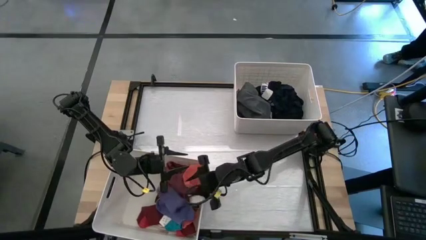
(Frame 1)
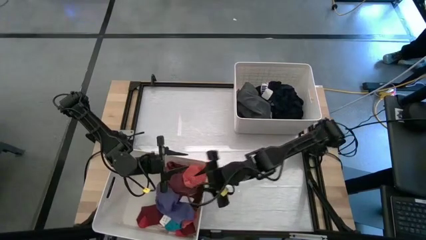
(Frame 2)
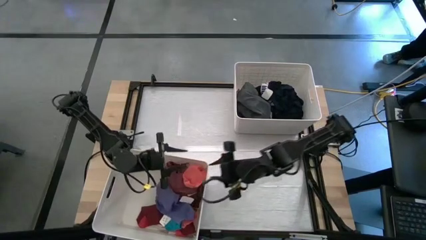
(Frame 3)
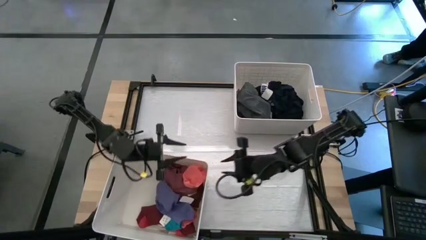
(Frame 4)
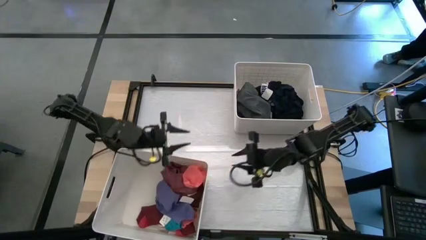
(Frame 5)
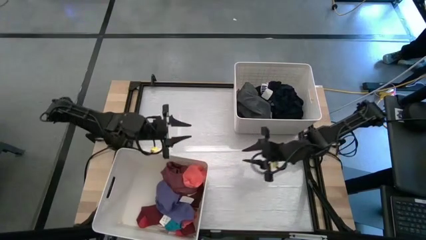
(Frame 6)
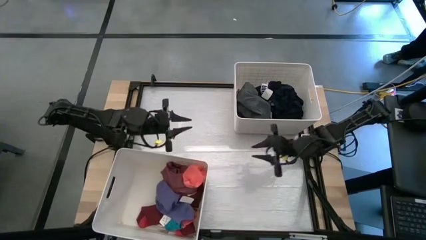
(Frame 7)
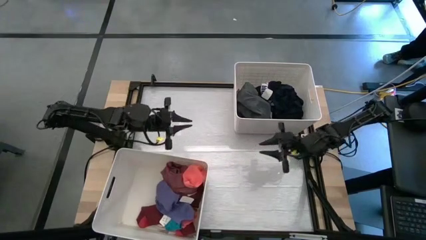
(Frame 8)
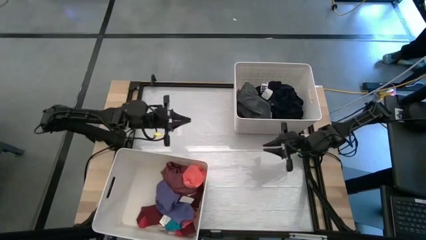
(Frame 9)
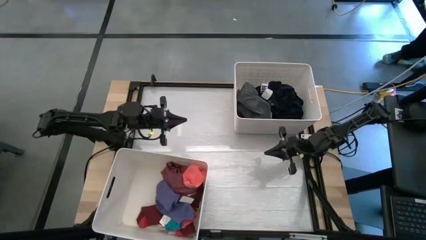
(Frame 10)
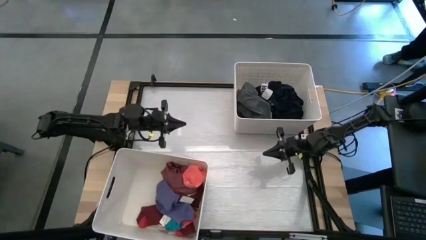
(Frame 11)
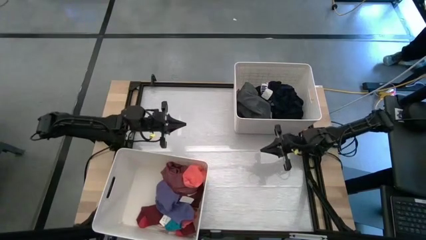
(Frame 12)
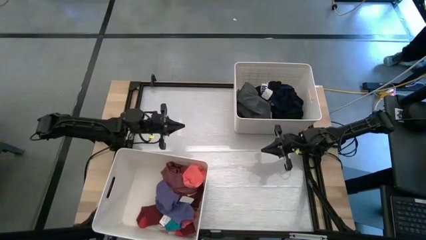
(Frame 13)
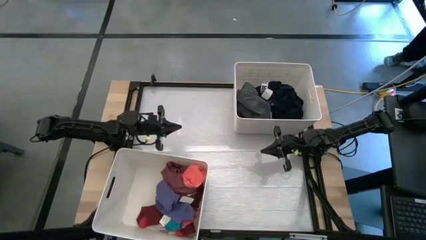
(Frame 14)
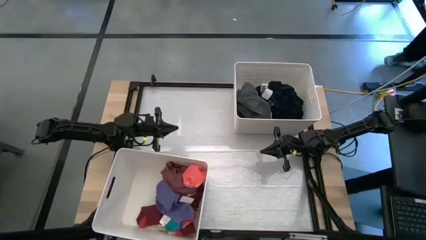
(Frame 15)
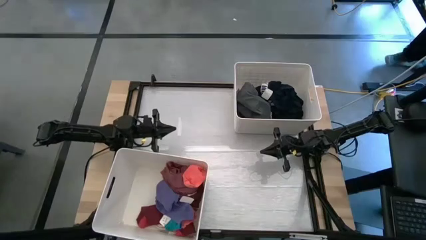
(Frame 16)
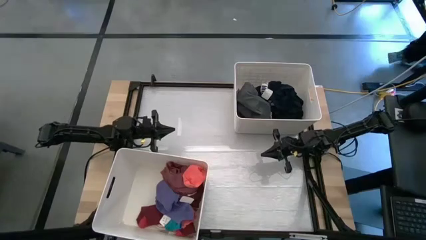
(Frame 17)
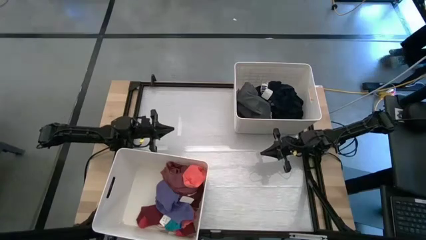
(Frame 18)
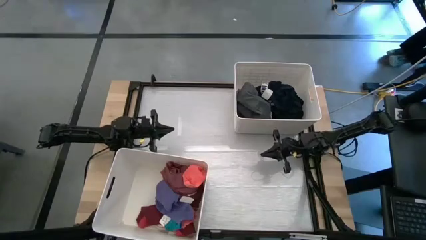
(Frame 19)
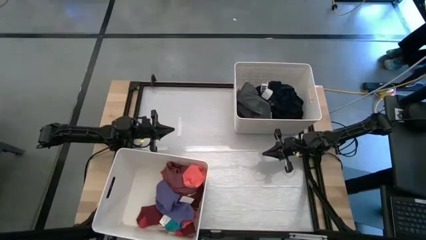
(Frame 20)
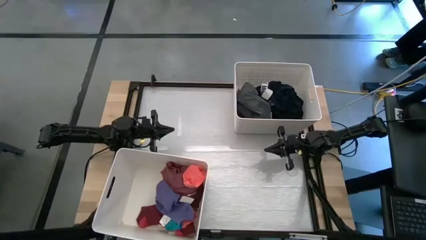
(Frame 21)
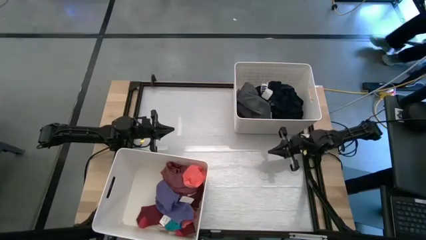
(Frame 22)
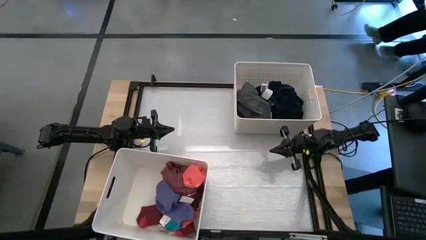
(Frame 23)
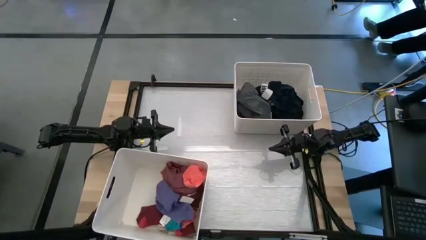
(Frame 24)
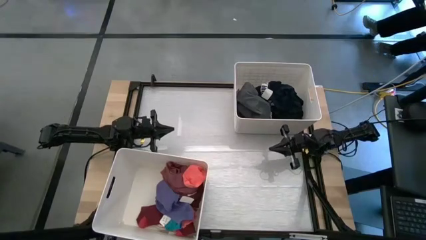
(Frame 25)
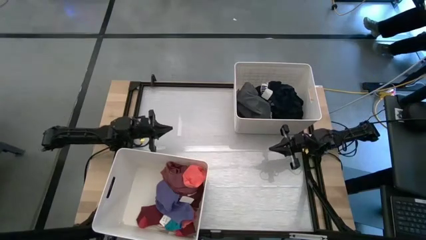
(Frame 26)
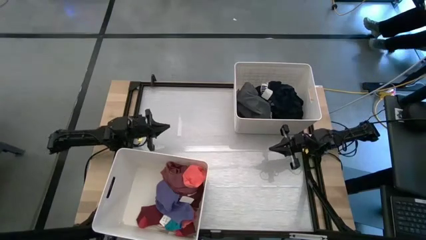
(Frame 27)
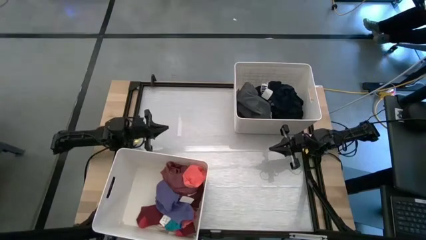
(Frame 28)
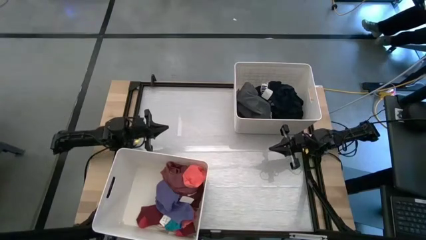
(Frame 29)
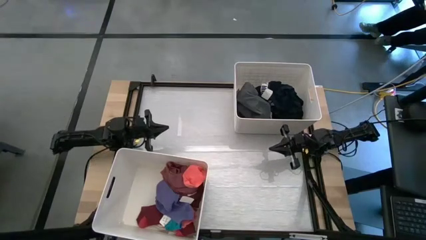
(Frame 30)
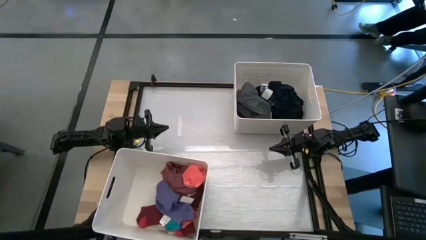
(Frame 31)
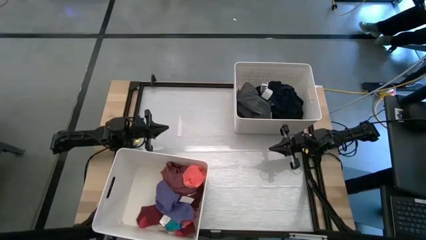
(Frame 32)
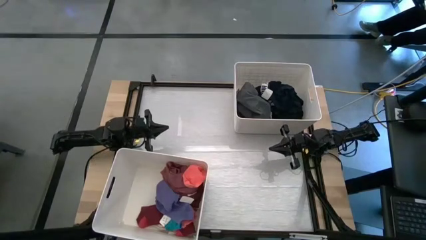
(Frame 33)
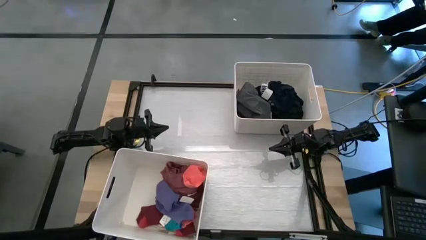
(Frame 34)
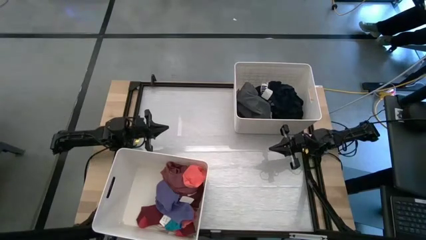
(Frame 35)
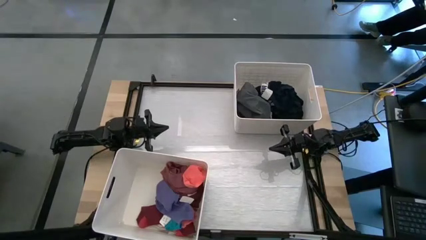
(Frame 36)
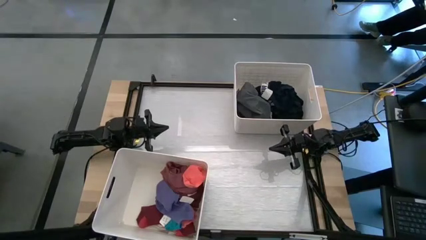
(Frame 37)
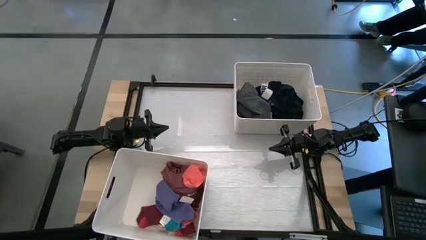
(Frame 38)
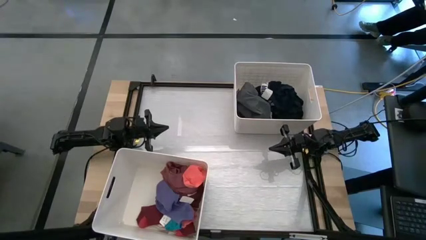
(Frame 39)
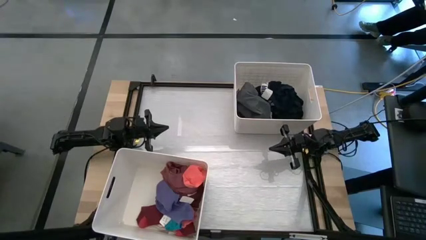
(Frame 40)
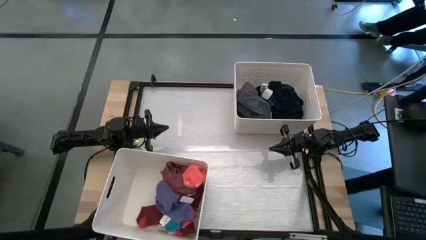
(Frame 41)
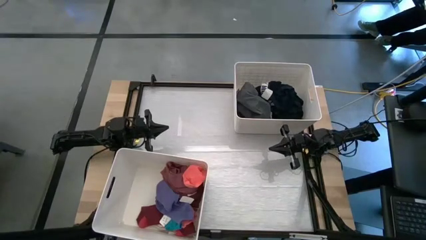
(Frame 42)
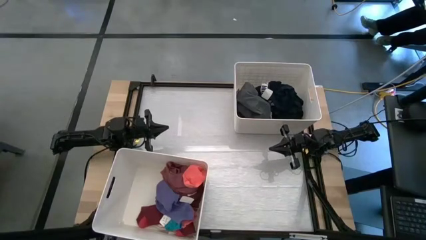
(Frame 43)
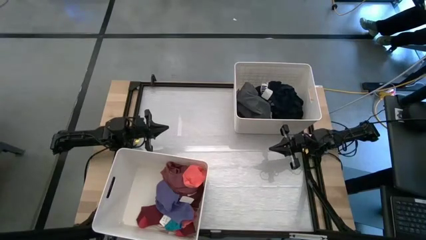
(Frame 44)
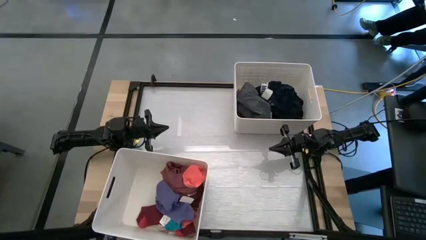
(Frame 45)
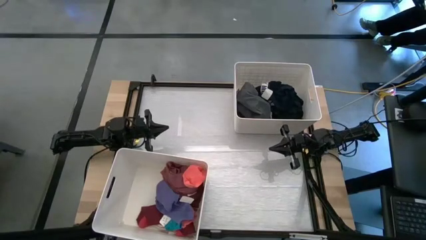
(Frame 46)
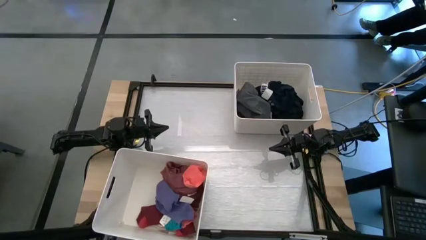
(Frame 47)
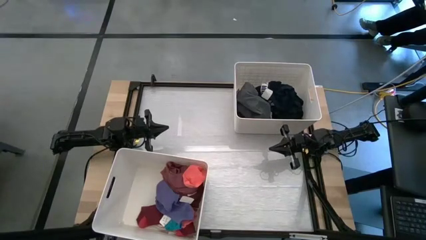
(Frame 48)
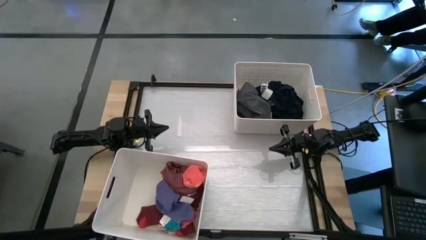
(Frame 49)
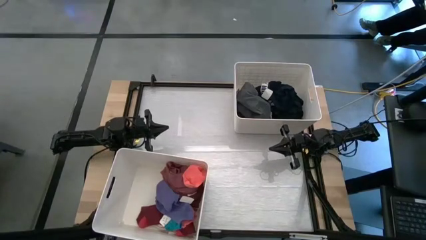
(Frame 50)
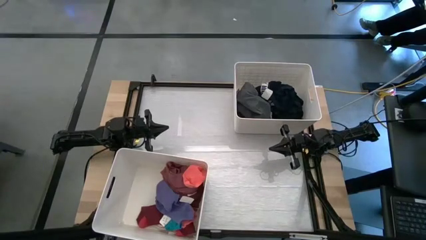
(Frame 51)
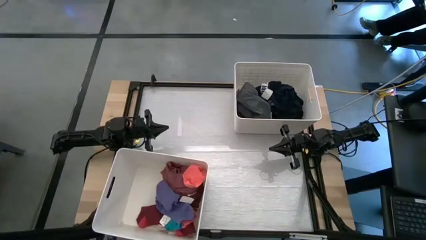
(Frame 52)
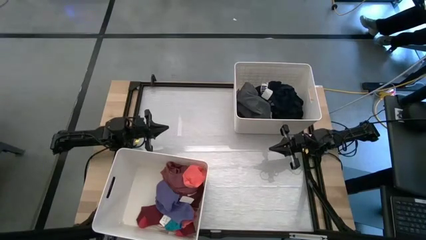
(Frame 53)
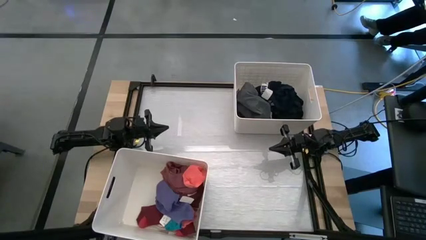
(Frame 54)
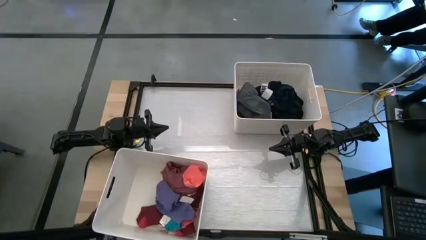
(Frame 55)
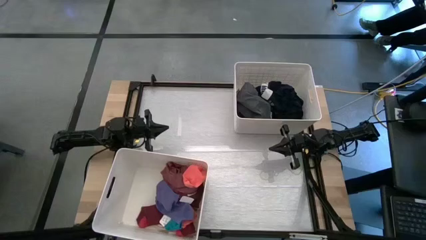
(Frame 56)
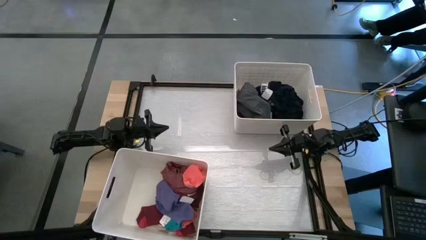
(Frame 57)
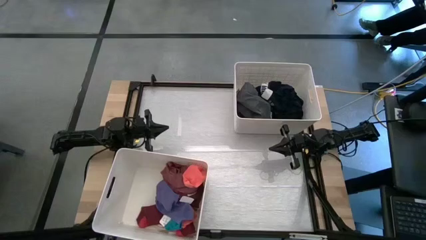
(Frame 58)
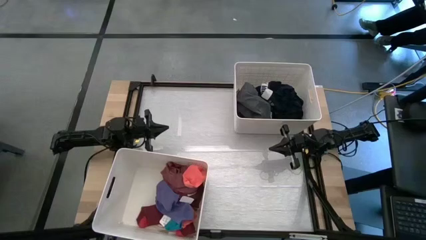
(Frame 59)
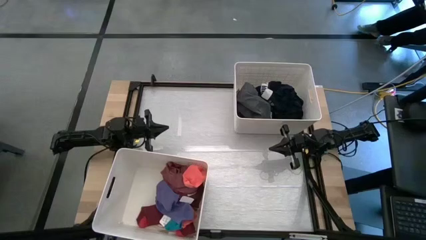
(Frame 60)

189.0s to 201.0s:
Task: Sort clothes
Return to Home Position

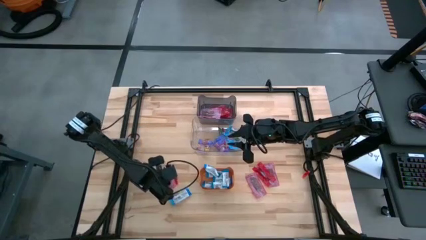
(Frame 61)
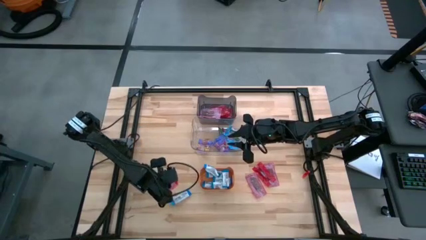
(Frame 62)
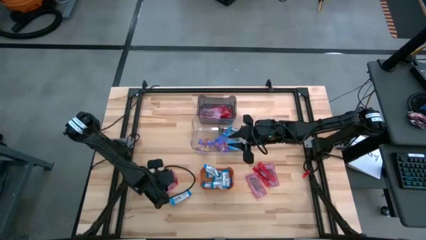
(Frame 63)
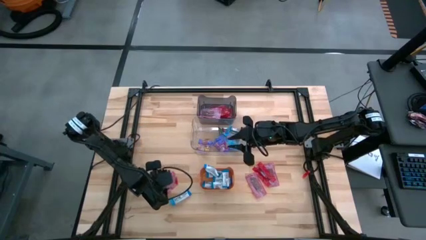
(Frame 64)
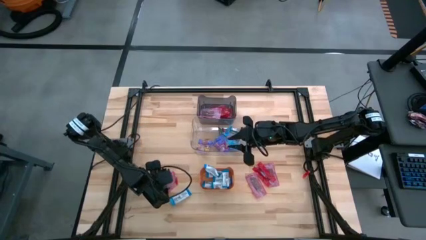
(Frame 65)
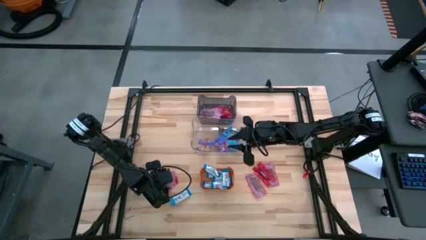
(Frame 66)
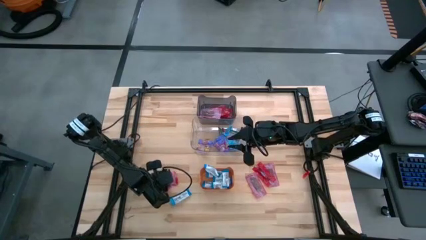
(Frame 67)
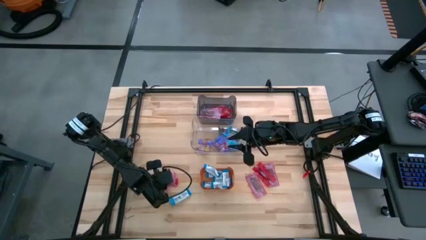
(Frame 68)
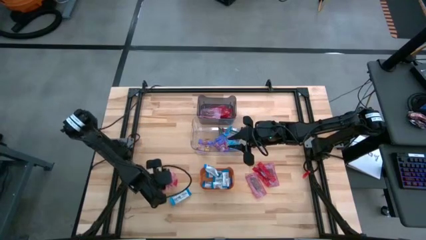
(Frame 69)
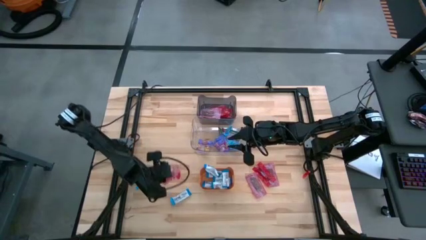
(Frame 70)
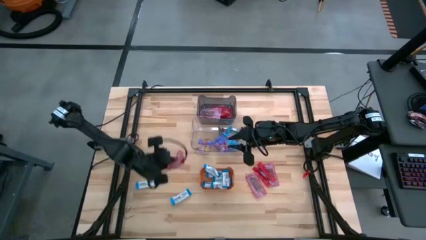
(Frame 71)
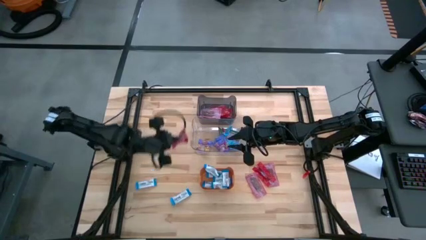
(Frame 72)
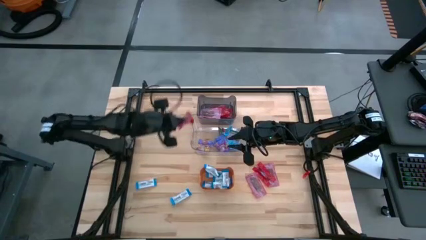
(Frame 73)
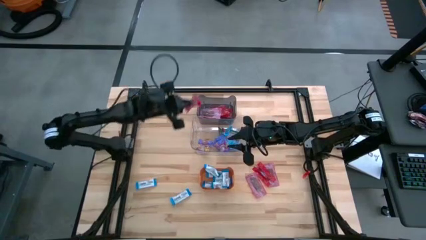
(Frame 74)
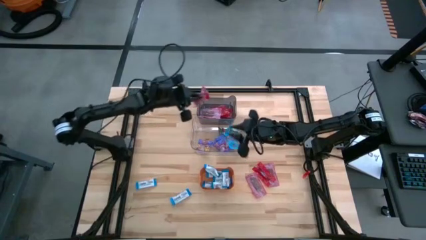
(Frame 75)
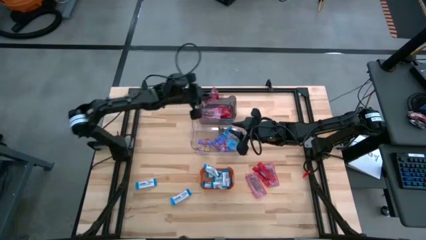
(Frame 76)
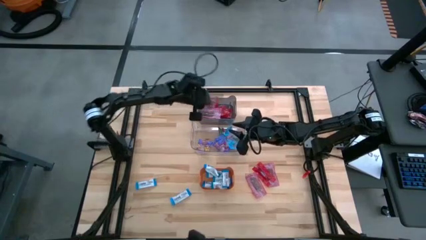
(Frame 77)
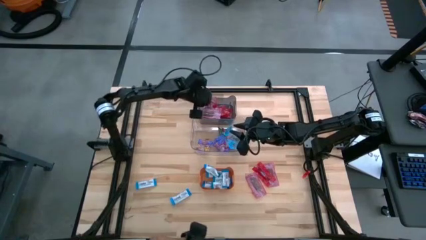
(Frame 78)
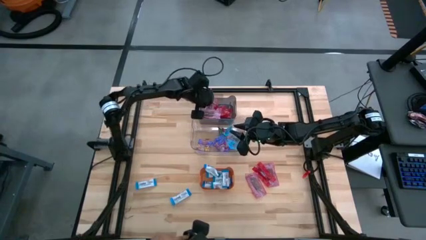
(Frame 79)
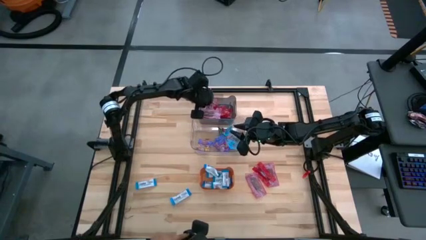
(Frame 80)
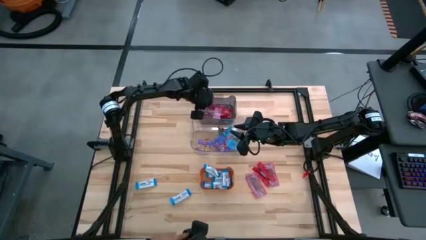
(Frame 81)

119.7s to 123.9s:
Task: Sort candy
Put the red candy into the black transparent bin
